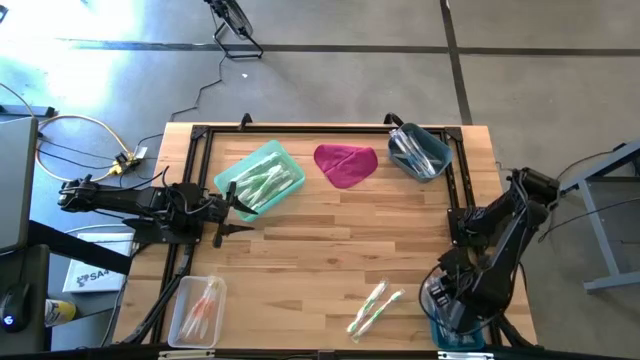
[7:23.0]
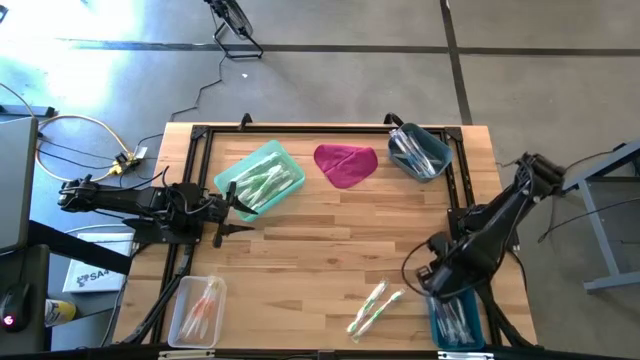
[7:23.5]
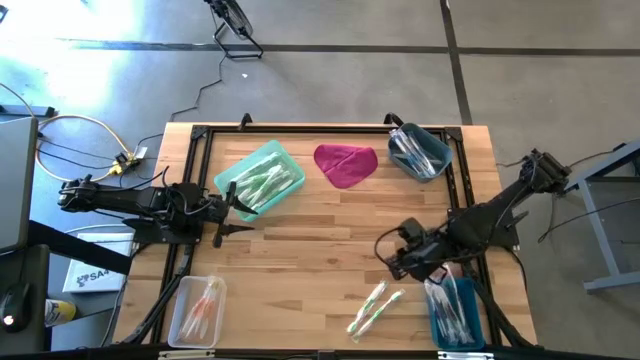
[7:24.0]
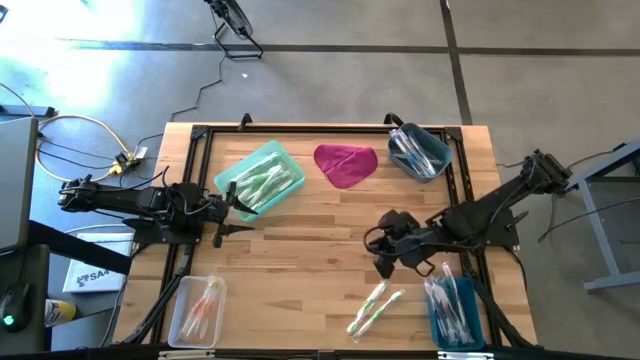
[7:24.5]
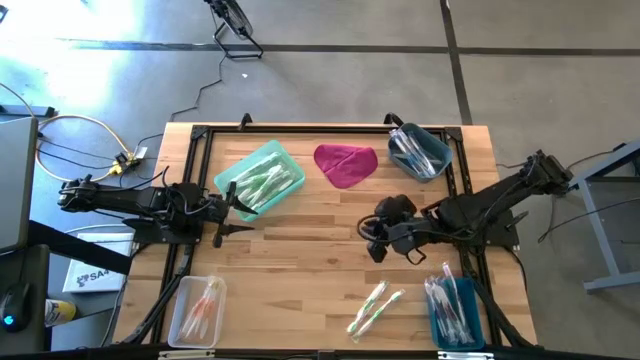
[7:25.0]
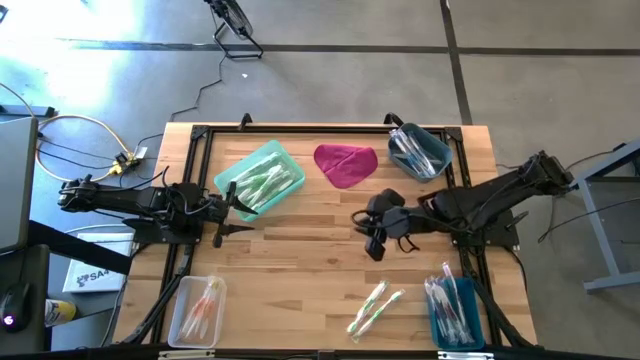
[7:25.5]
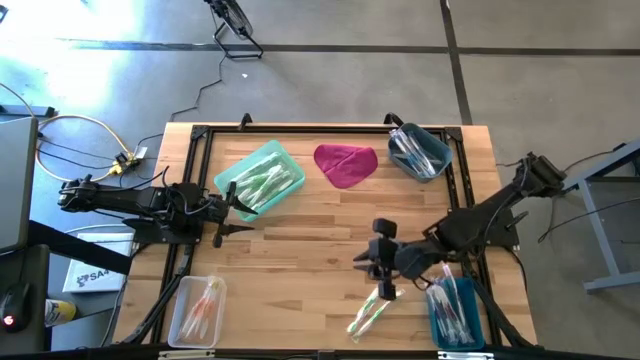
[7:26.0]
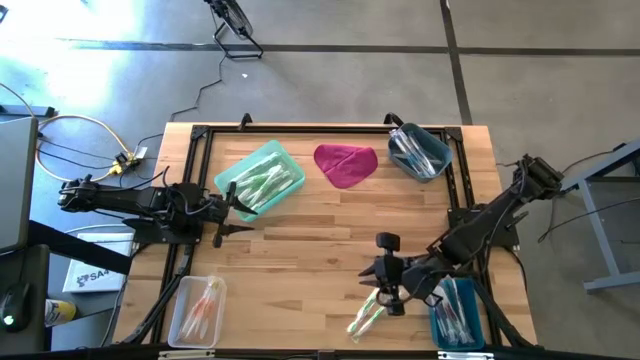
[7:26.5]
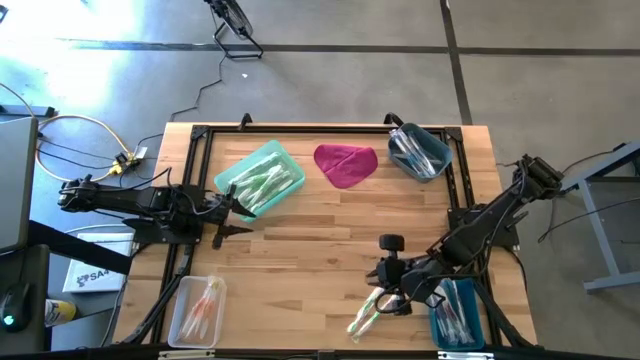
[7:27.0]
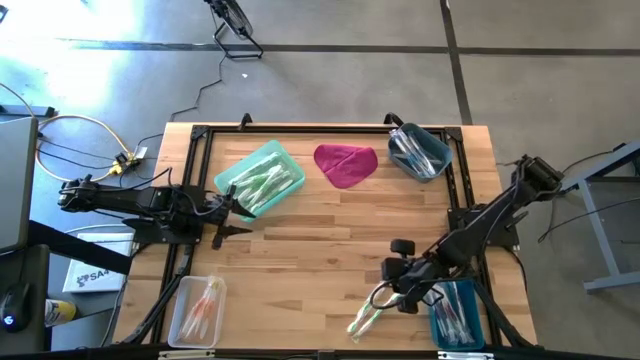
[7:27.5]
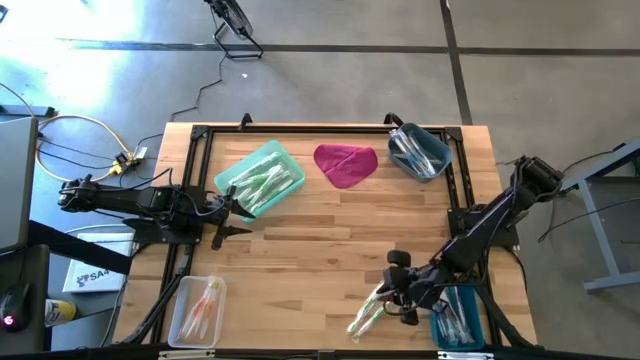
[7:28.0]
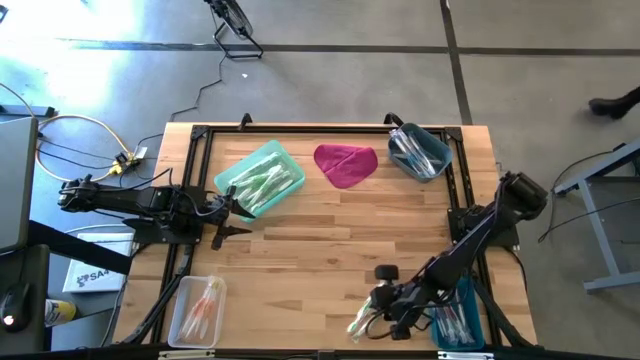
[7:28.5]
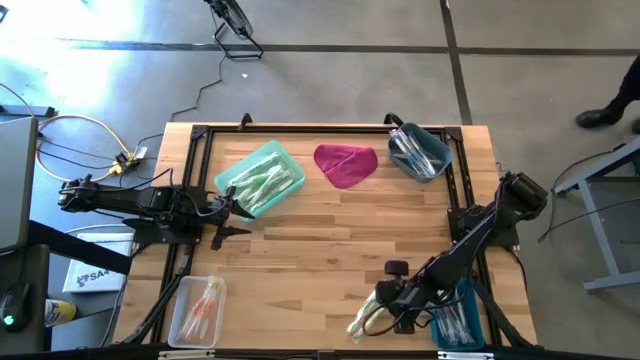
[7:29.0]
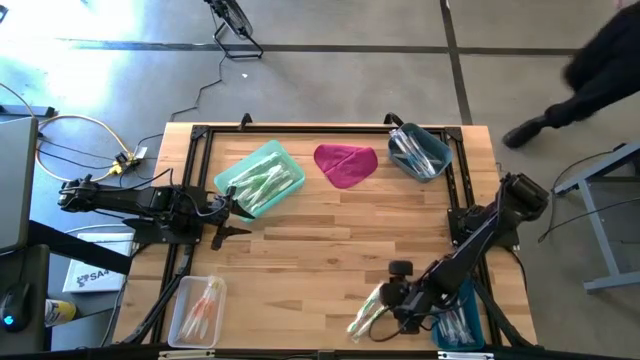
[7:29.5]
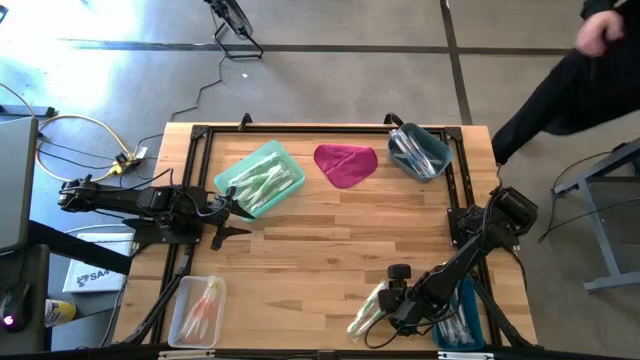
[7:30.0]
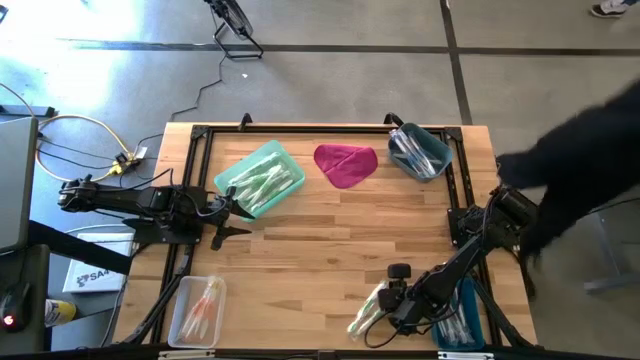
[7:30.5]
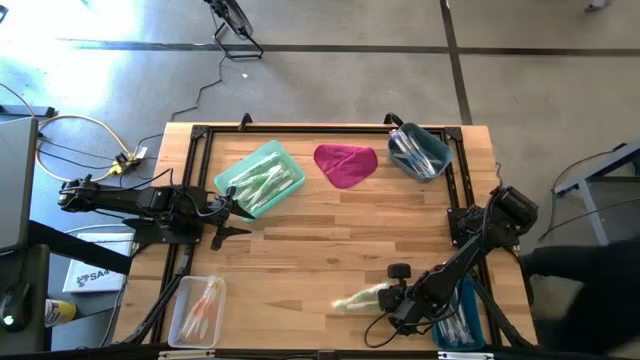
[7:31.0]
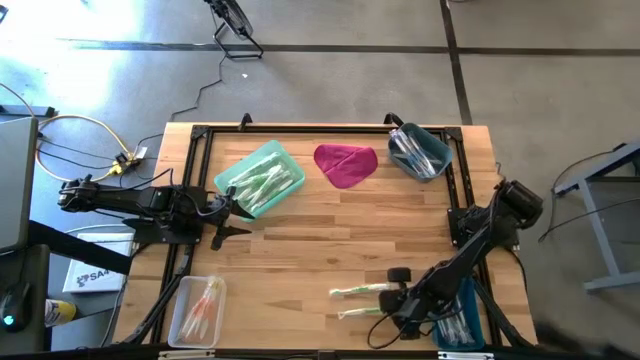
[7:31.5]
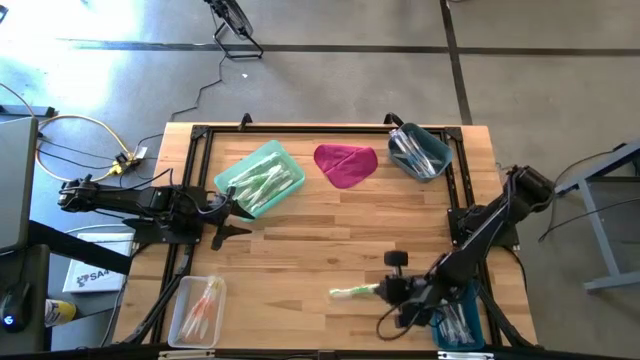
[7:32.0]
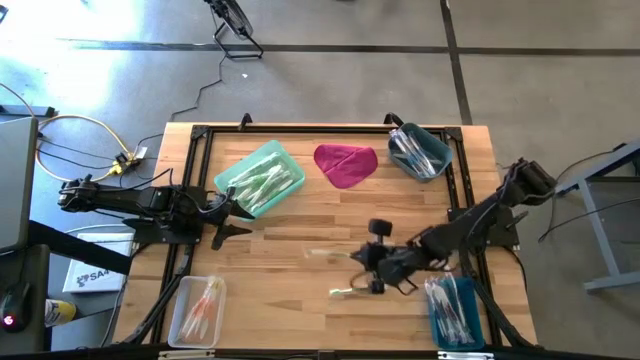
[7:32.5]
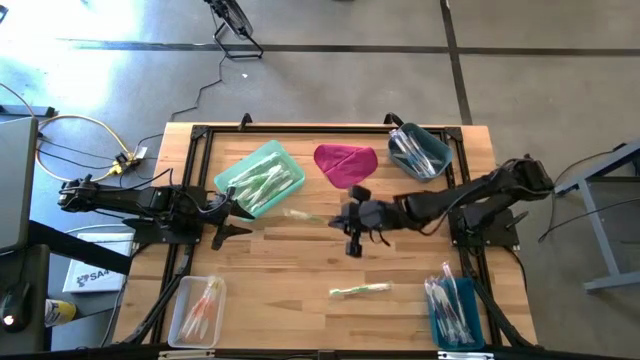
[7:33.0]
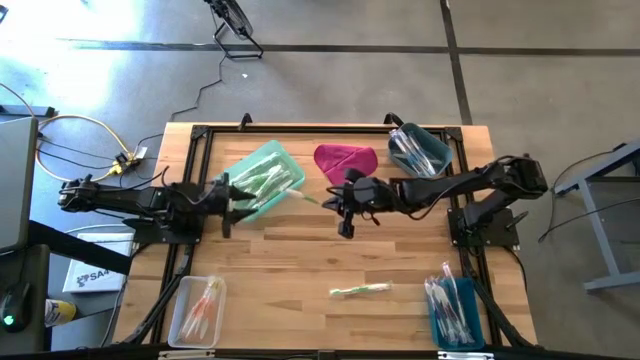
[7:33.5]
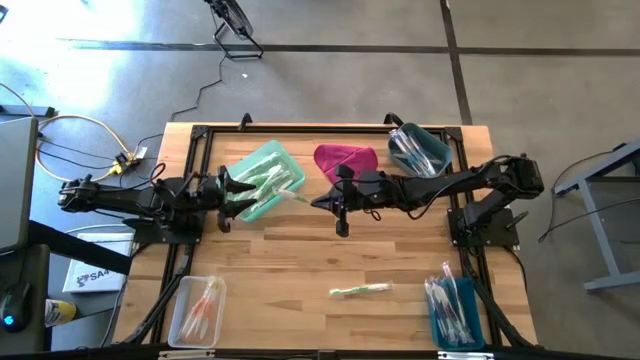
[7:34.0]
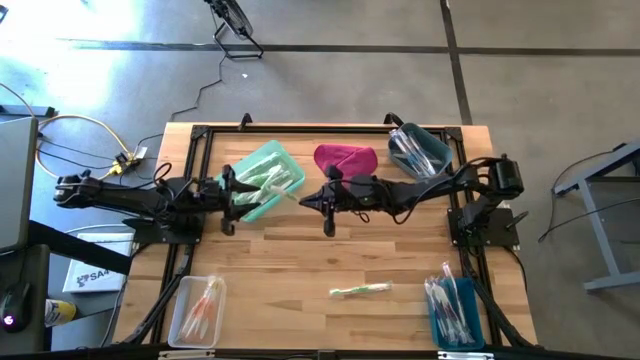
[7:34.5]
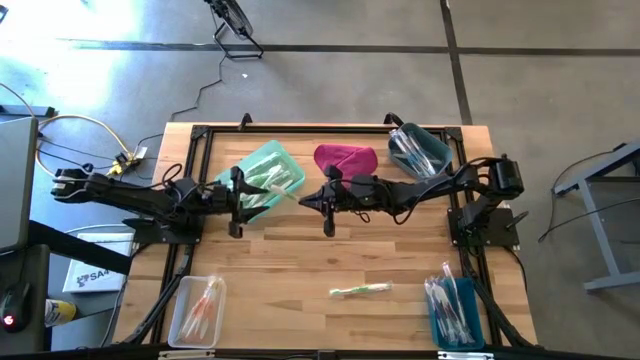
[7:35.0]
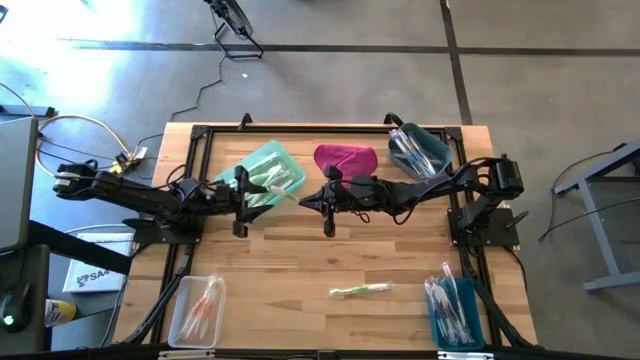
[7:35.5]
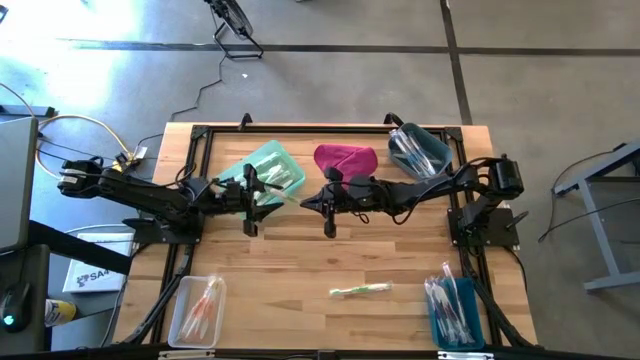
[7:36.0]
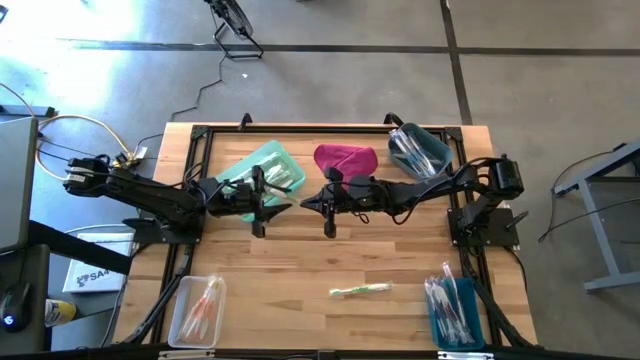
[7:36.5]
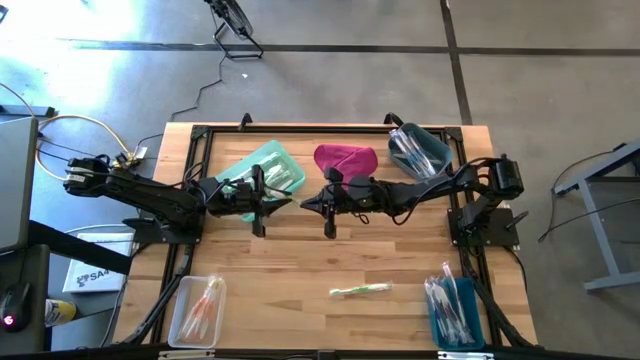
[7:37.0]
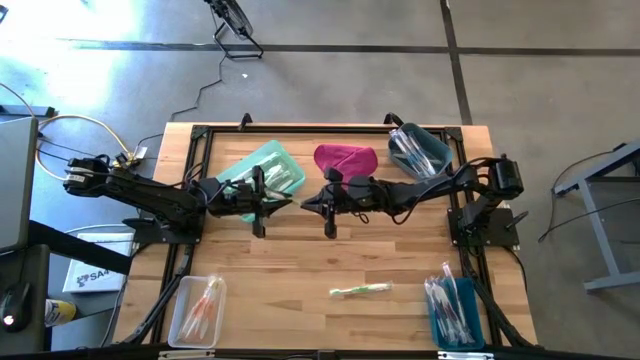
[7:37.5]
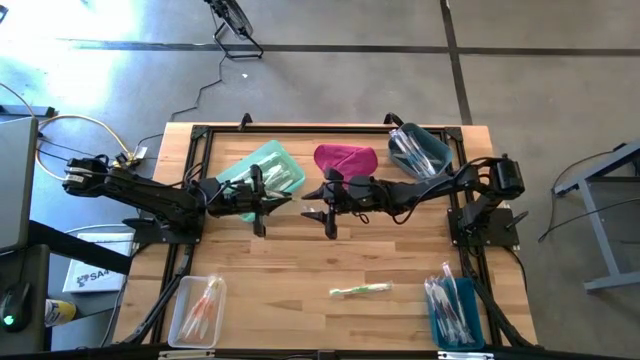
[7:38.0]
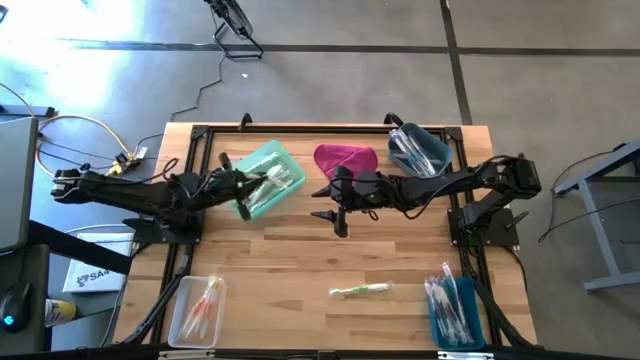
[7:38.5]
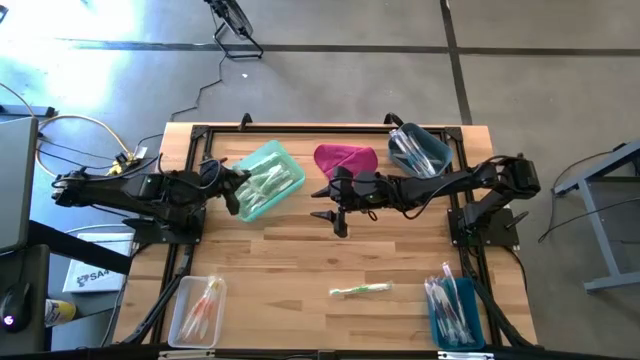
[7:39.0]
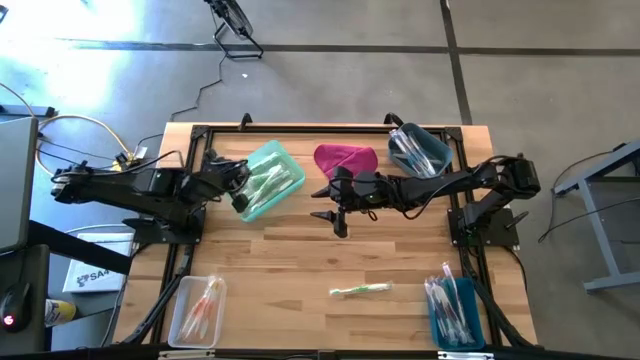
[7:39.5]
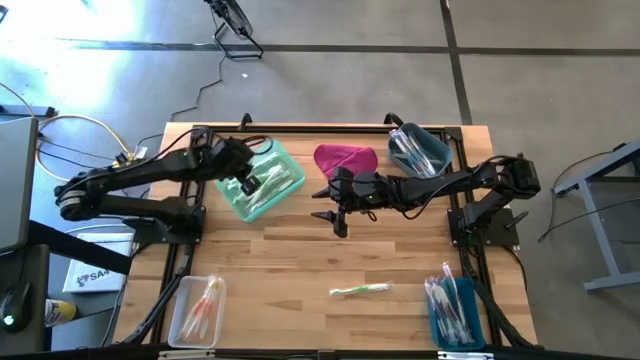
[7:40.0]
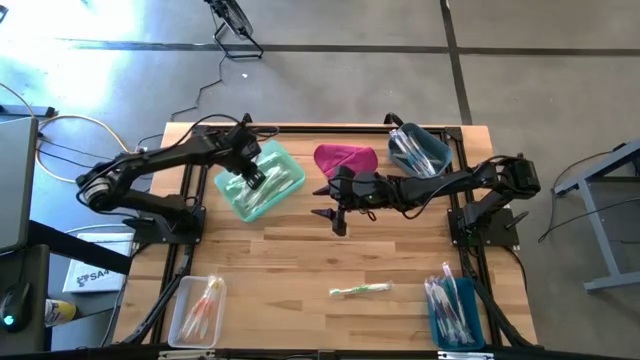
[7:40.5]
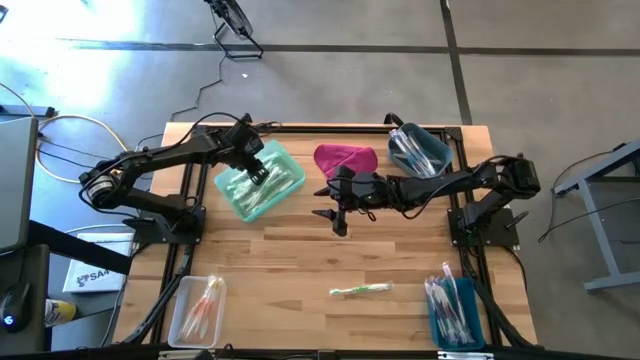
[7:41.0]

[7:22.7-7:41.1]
Task: Pick & Place Toothbrushes
Put the green toothbrush to the green bin

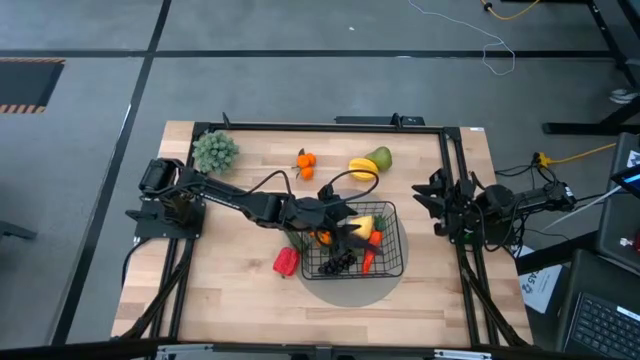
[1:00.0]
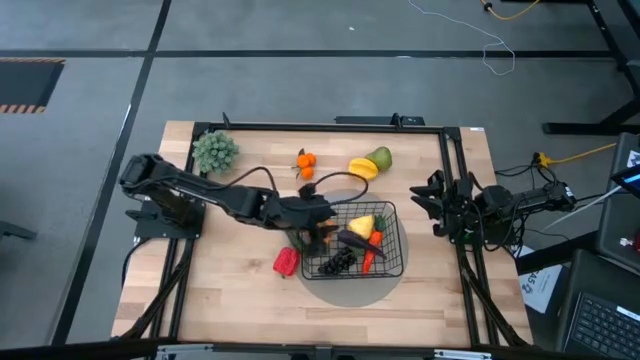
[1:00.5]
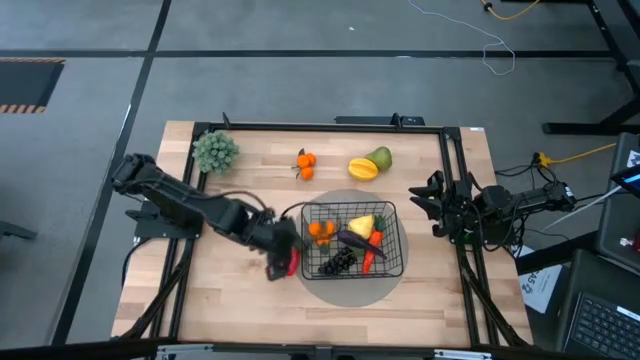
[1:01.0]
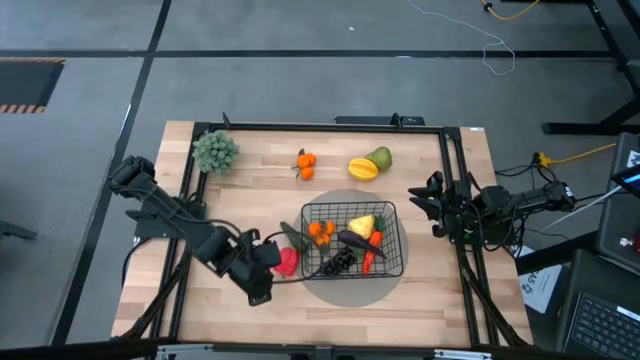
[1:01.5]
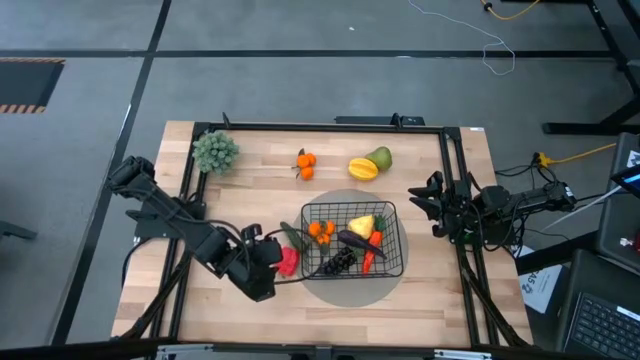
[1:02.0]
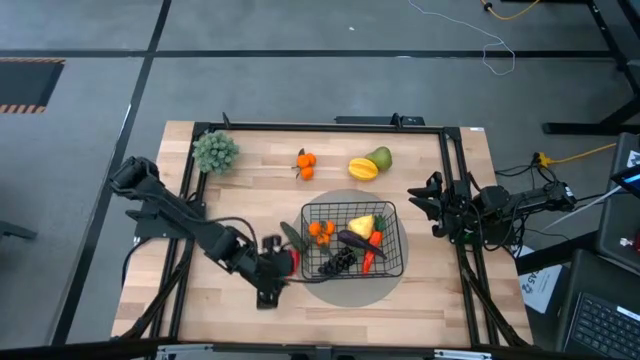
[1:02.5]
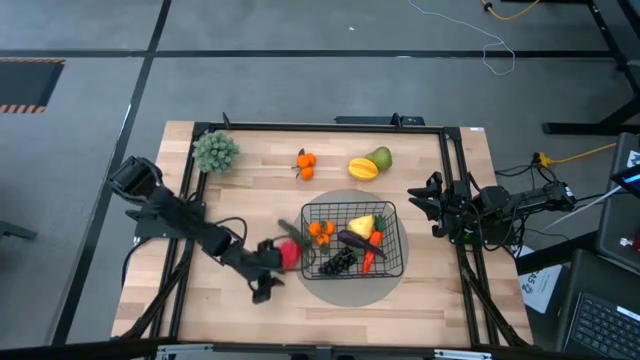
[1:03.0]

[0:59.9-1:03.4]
Task: Build produce basket
Adjust the red bell pepper

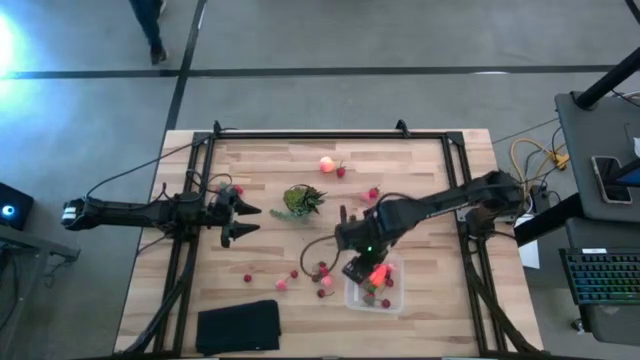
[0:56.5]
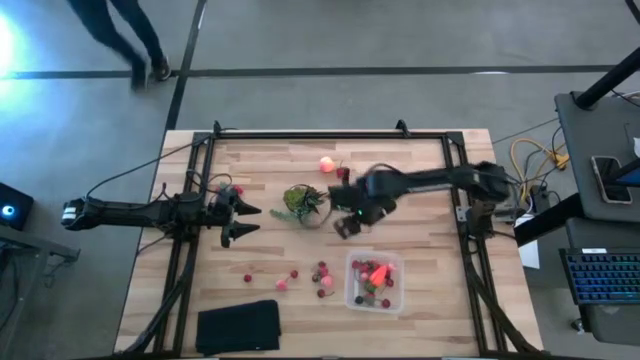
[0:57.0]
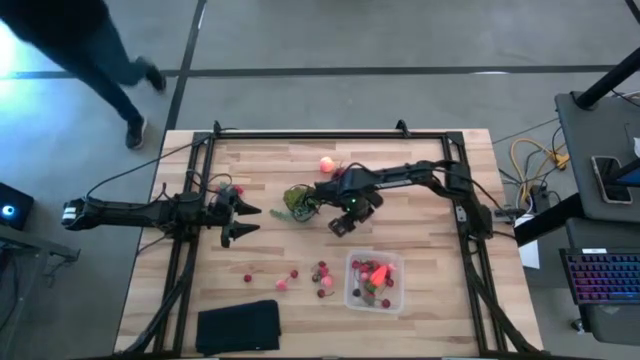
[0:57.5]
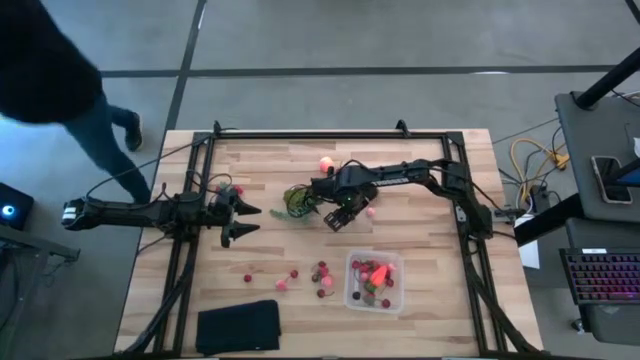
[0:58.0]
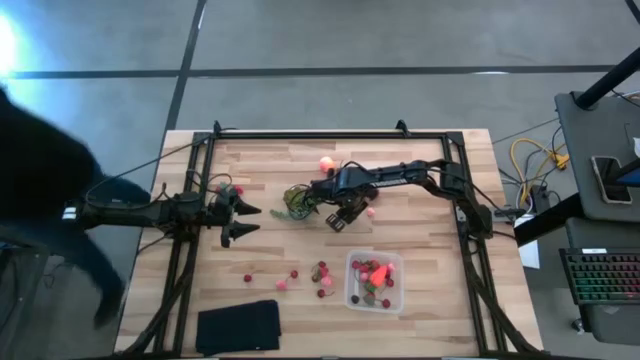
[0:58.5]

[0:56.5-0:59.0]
Task: Pick and placing Produce into tupperware
Put the blackberry into the bin
